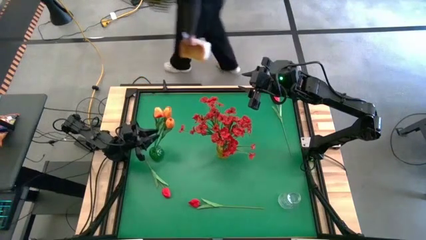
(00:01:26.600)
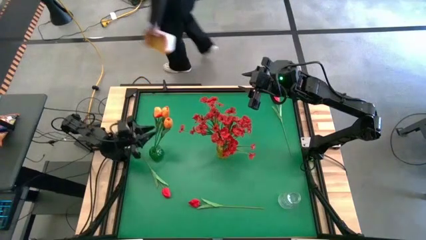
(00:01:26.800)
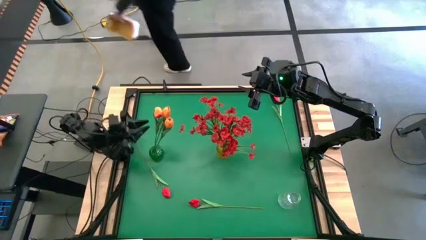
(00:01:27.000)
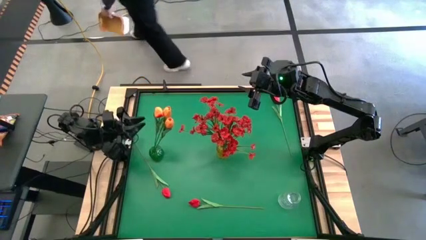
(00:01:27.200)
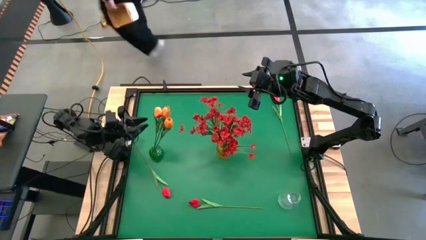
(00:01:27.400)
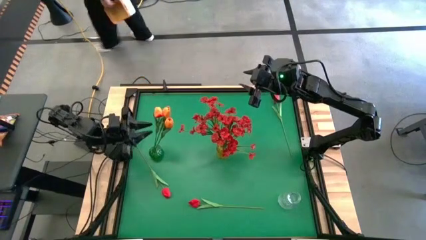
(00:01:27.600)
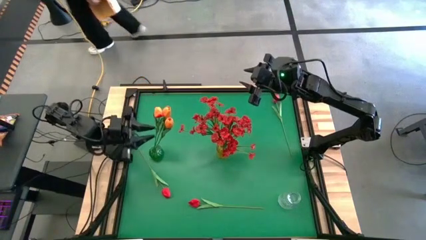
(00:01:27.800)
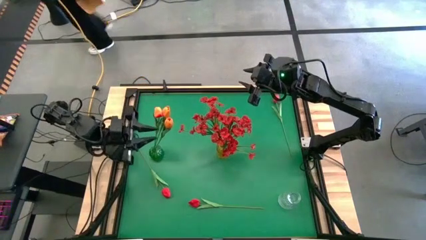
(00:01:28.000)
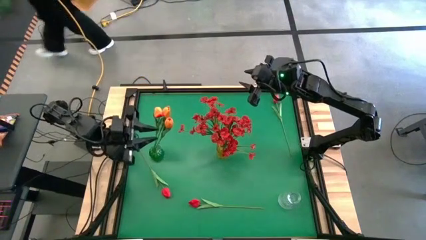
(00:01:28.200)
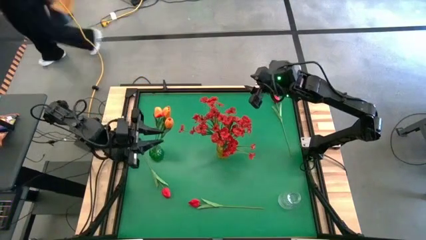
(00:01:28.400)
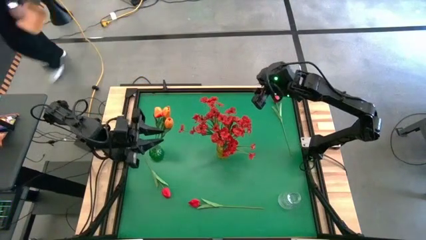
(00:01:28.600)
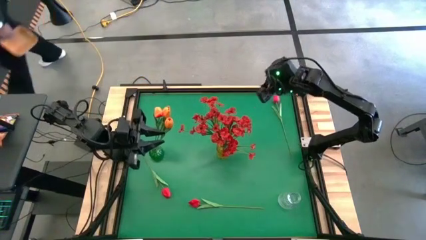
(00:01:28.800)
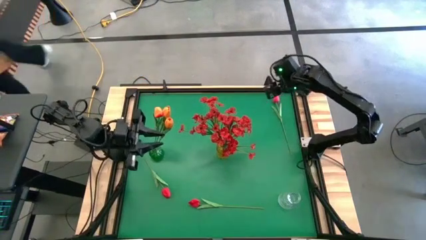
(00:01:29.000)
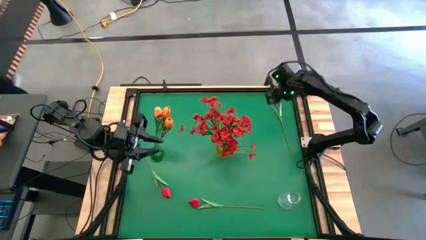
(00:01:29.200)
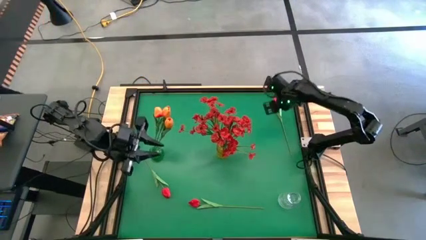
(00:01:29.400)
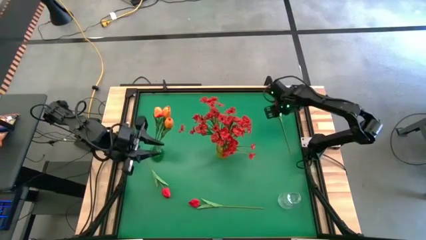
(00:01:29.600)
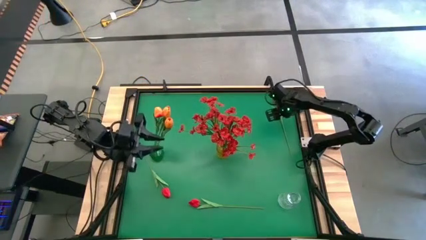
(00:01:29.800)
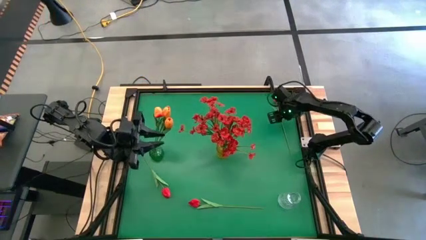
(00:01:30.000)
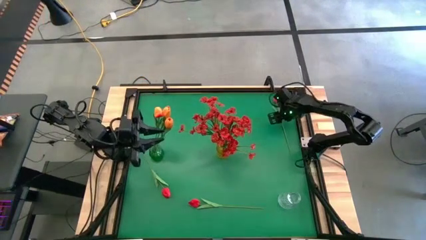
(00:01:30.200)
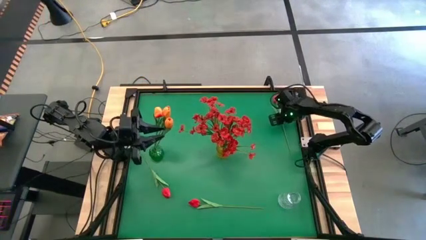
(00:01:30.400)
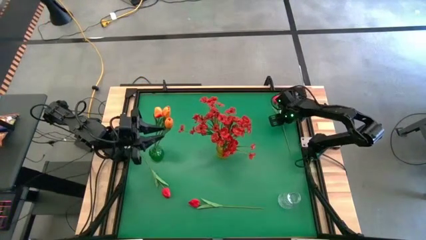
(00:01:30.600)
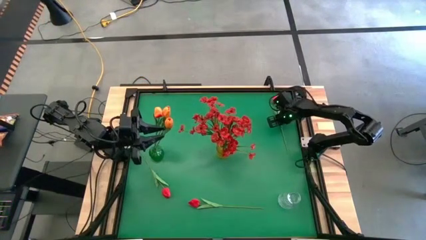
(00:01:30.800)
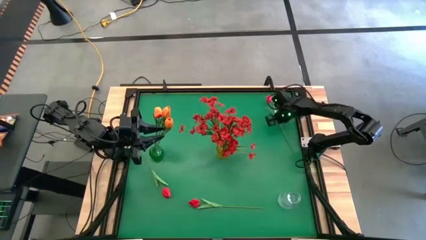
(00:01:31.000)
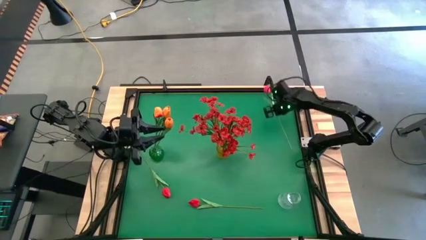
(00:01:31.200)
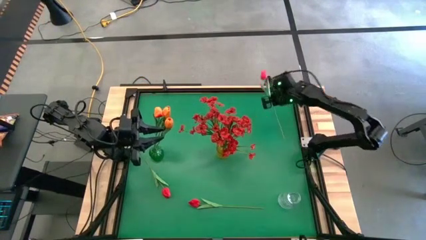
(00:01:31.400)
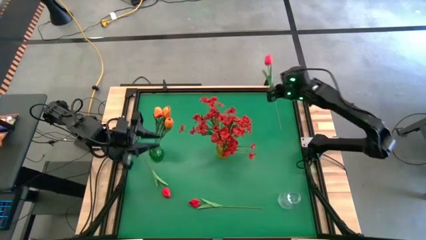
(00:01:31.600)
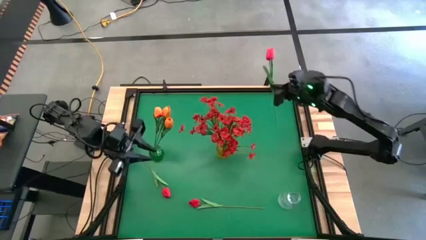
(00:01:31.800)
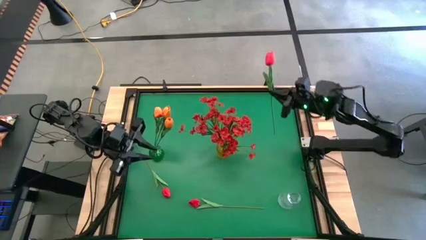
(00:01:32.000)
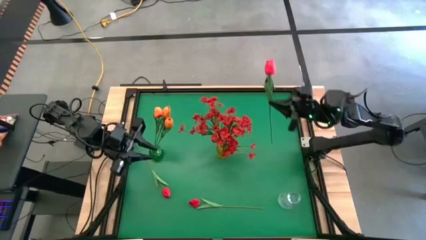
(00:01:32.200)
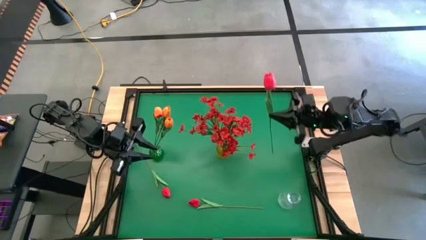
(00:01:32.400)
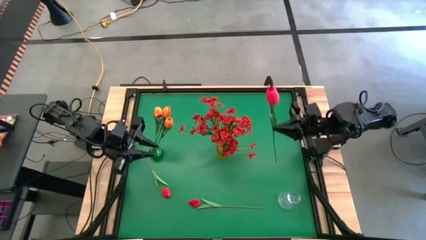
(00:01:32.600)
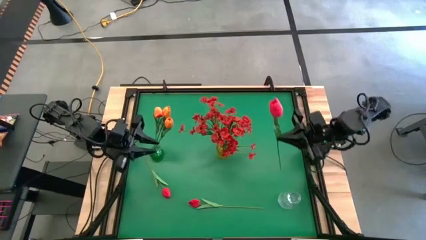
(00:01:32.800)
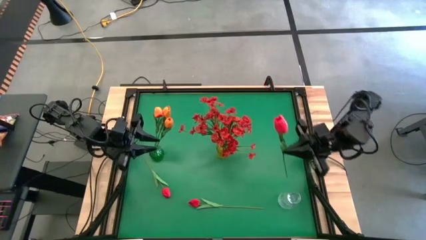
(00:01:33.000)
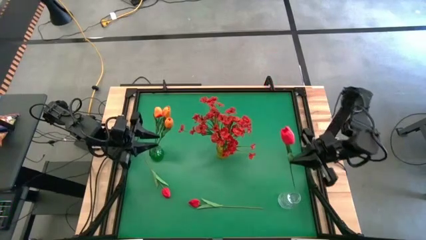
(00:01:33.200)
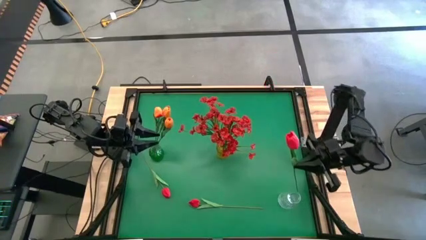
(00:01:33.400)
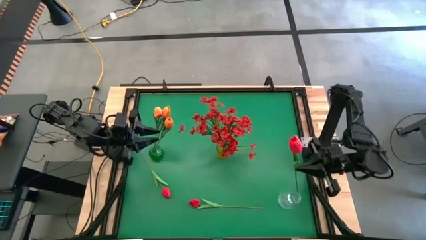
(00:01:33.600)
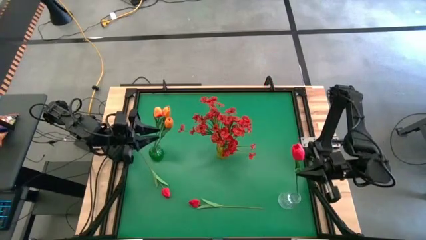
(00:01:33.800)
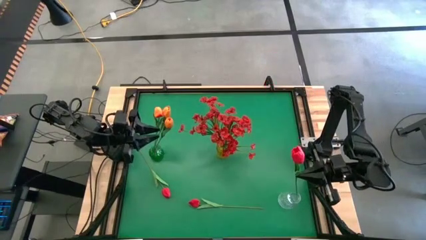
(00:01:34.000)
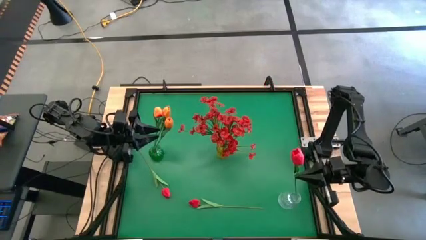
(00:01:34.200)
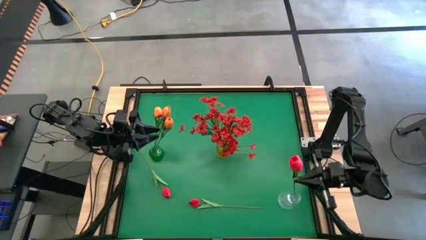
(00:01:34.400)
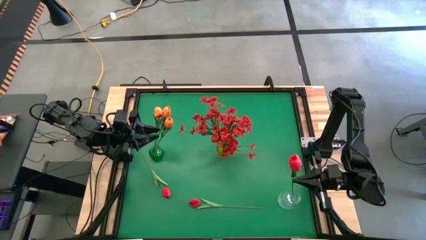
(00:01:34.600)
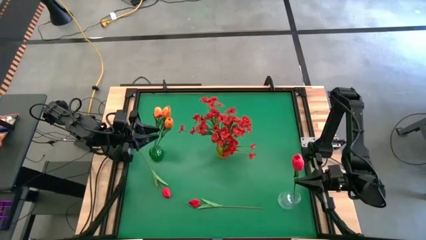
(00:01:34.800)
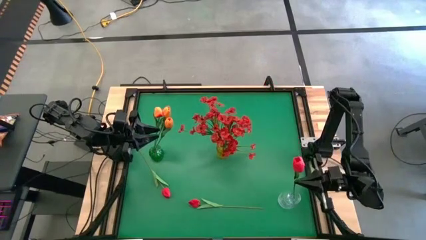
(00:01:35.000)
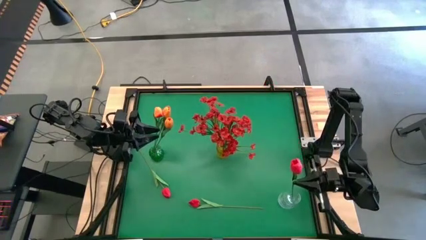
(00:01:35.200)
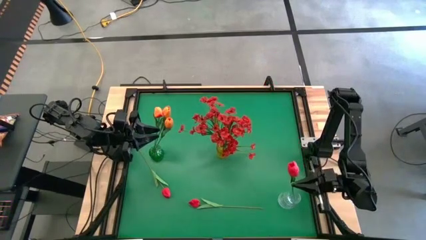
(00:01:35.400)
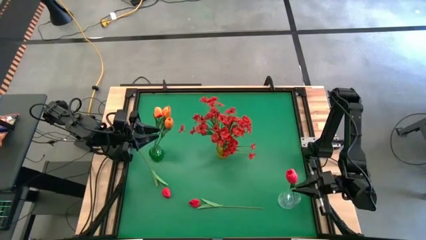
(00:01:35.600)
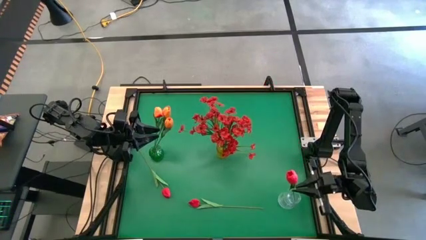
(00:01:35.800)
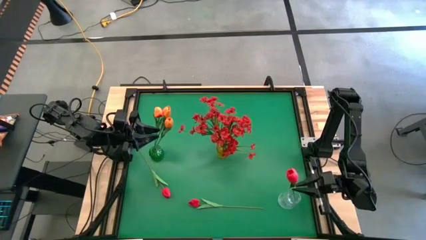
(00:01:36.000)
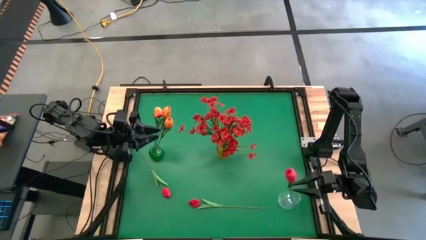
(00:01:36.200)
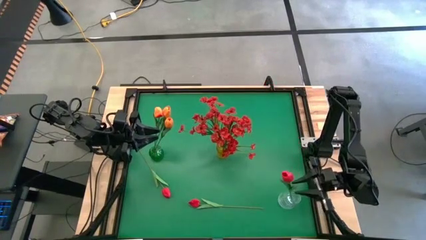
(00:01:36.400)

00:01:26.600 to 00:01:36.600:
Task: Sort flowers into vase by color
Put the top right red flower into the transparent vase
